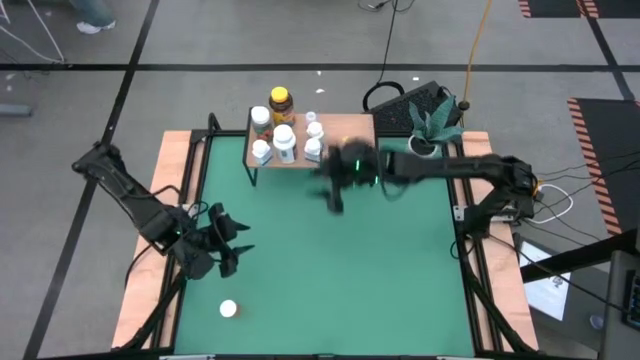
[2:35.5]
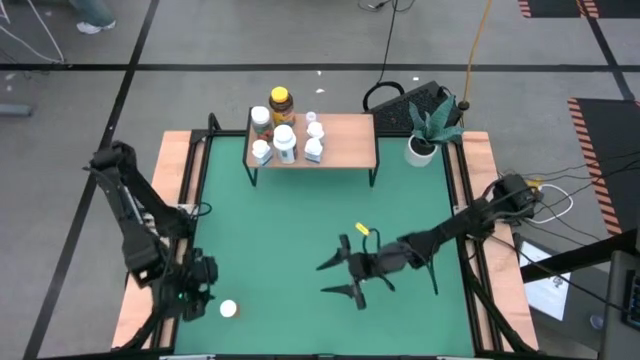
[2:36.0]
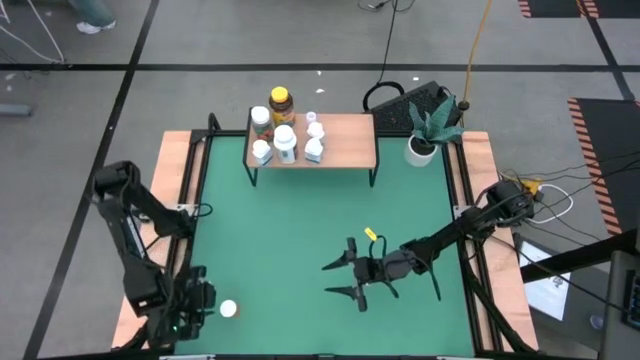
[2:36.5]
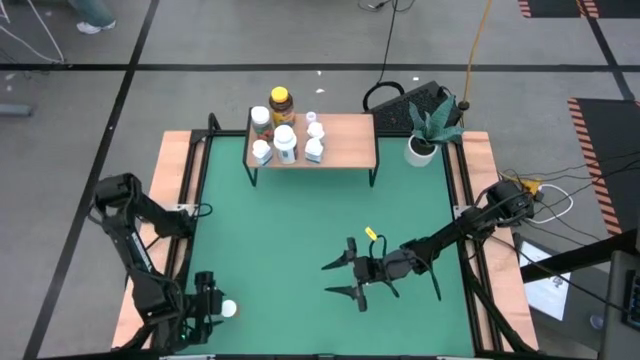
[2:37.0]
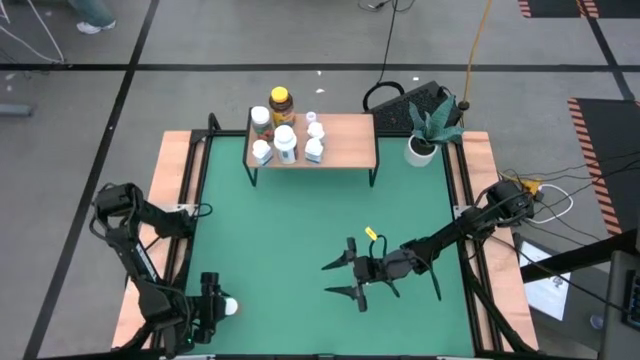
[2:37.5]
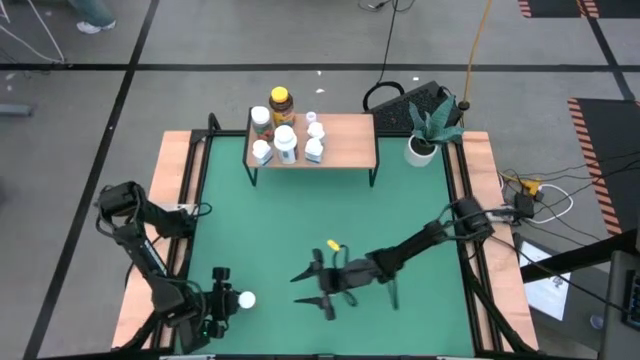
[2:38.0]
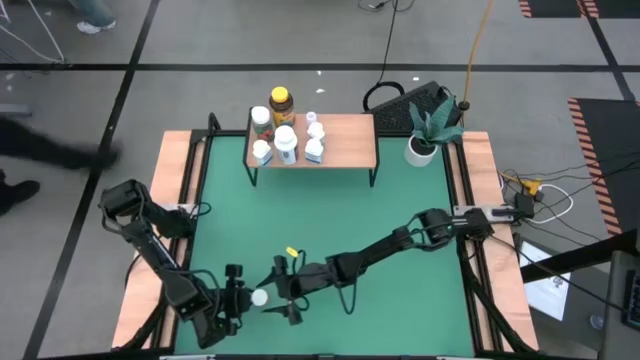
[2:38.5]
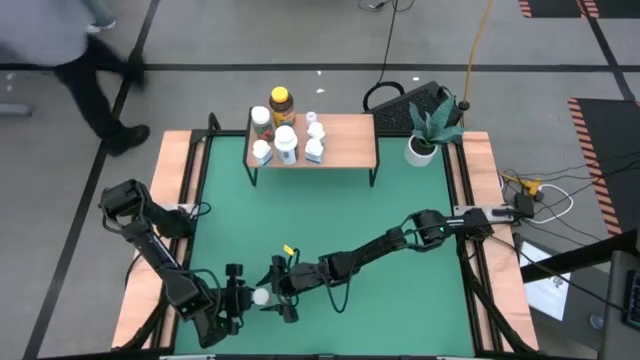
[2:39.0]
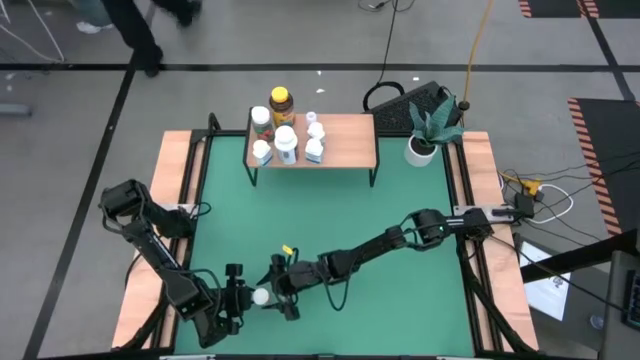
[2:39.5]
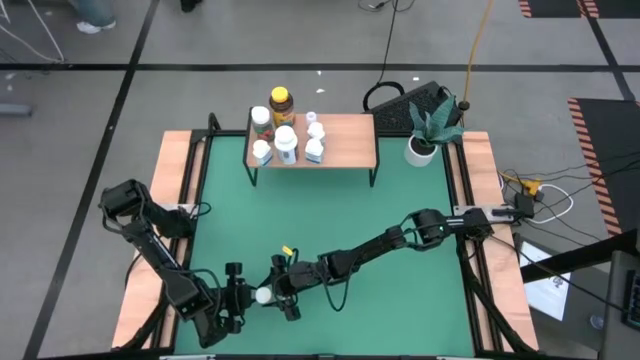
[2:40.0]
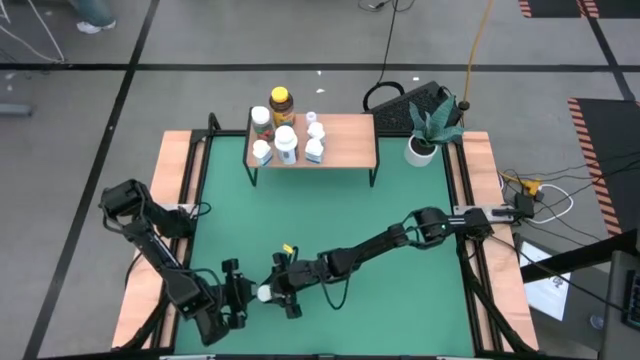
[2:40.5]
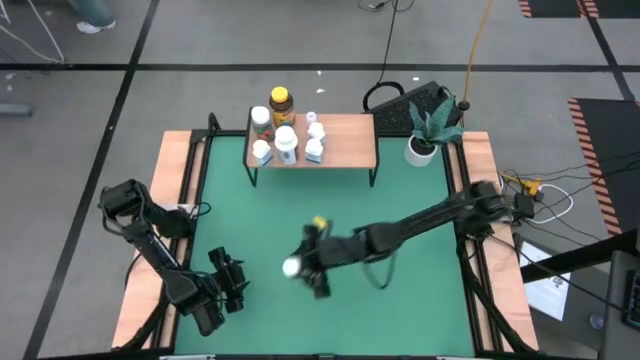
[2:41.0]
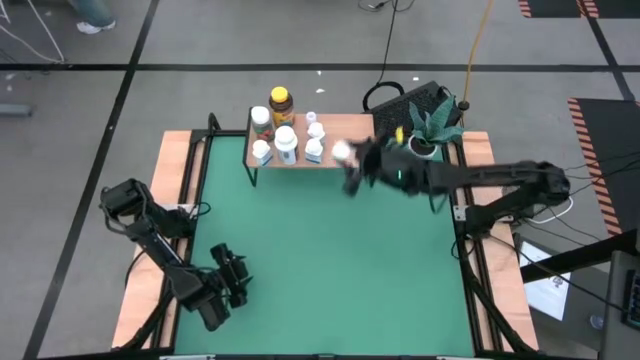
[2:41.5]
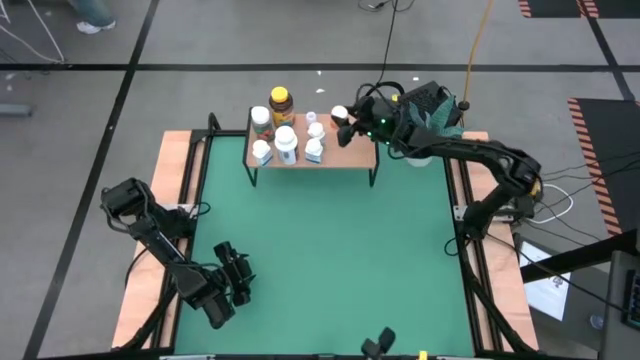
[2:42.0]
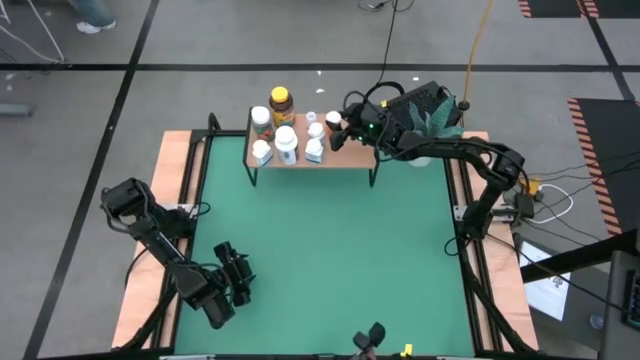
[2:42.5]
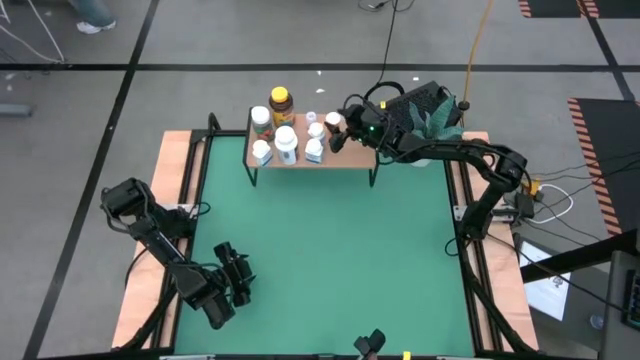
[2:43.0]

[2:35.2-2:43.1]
Task: Pick and place medicine bottles onto shelf by color
Put the orange medicine bottle on the shelf

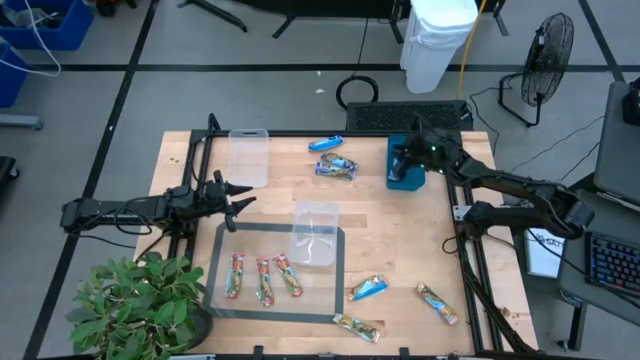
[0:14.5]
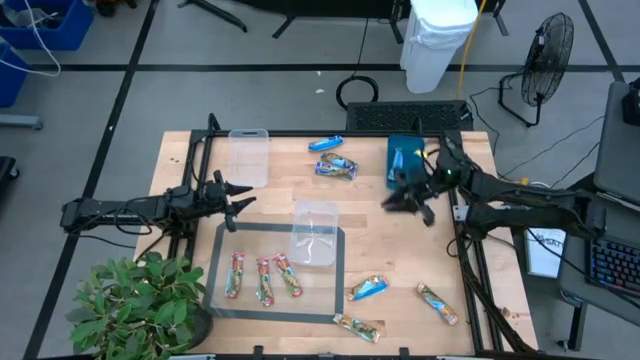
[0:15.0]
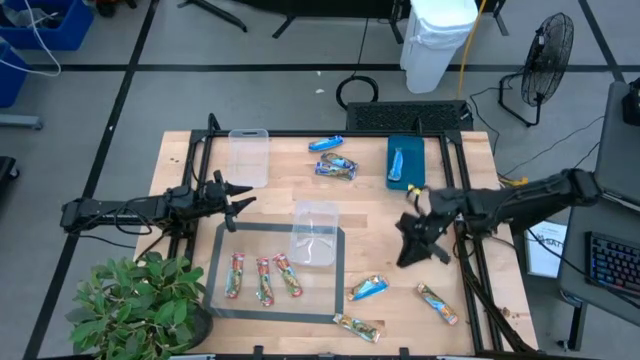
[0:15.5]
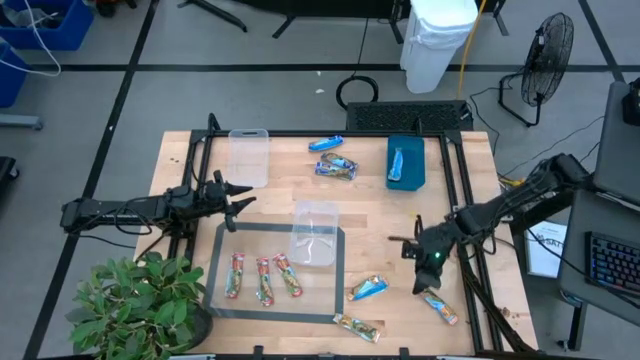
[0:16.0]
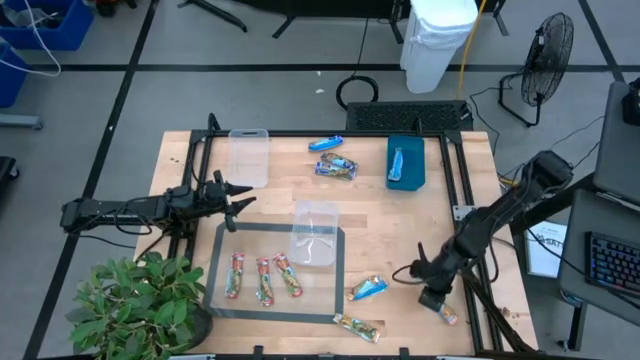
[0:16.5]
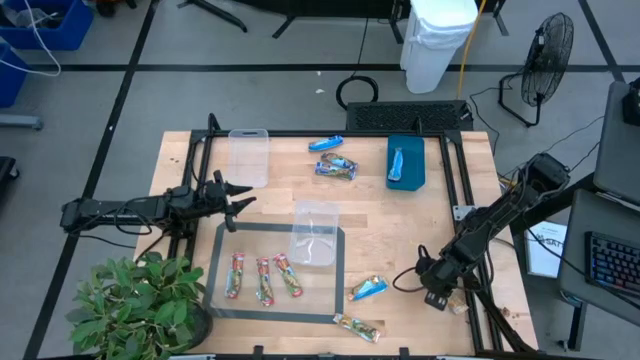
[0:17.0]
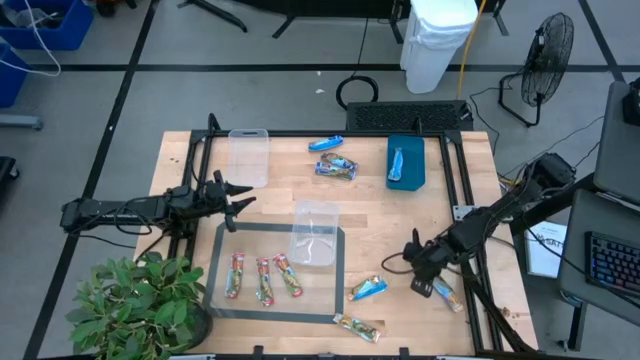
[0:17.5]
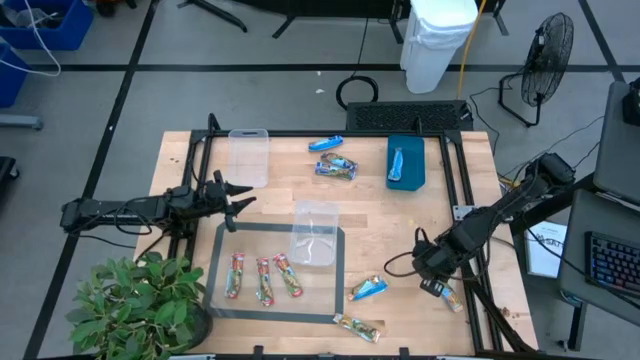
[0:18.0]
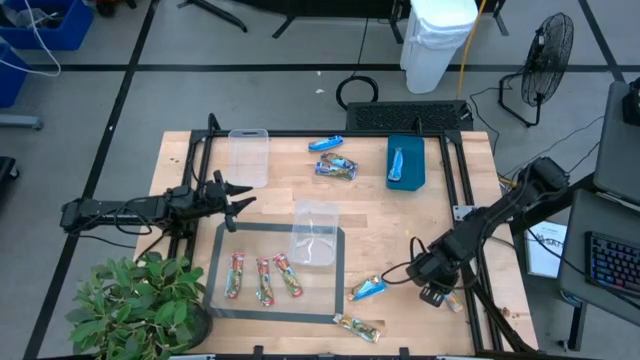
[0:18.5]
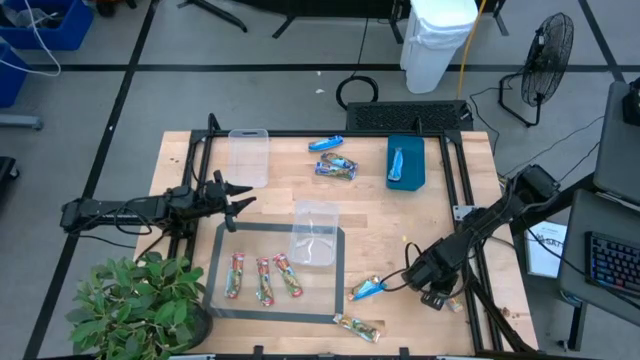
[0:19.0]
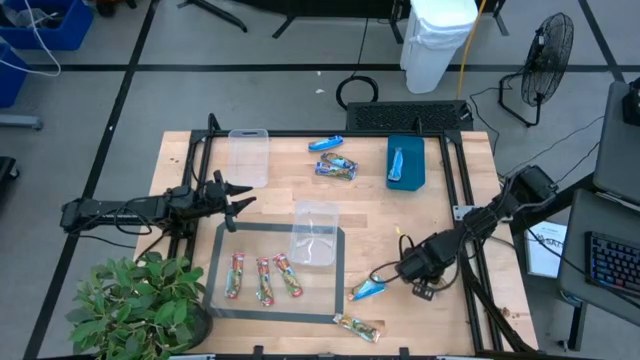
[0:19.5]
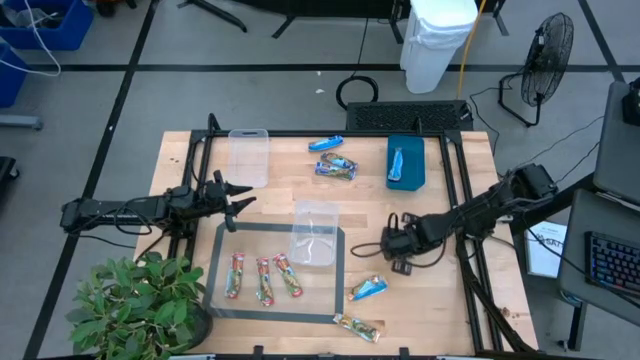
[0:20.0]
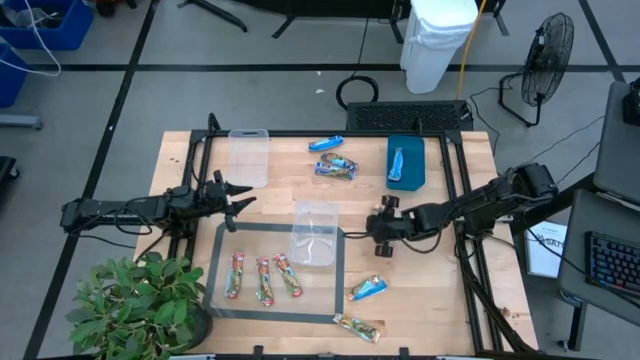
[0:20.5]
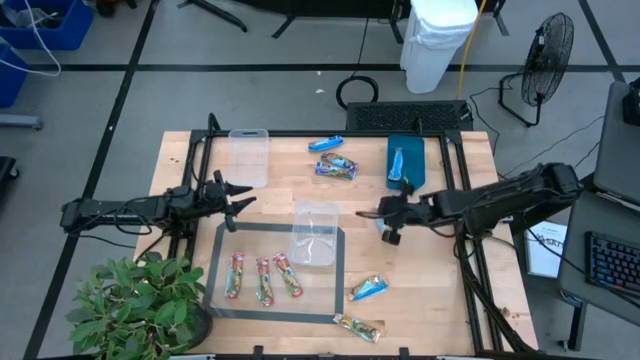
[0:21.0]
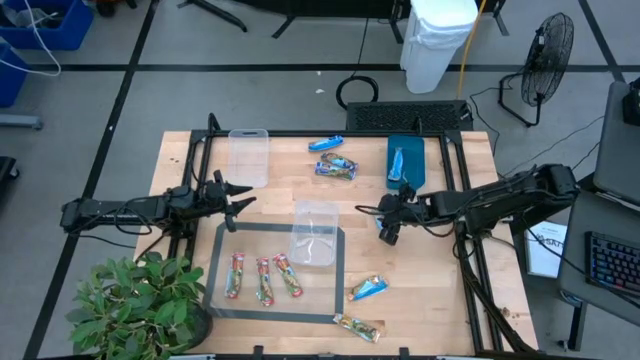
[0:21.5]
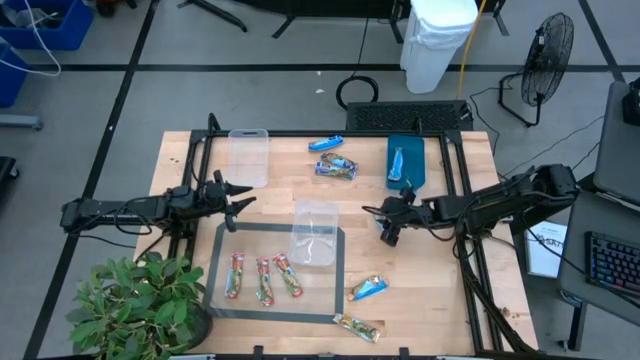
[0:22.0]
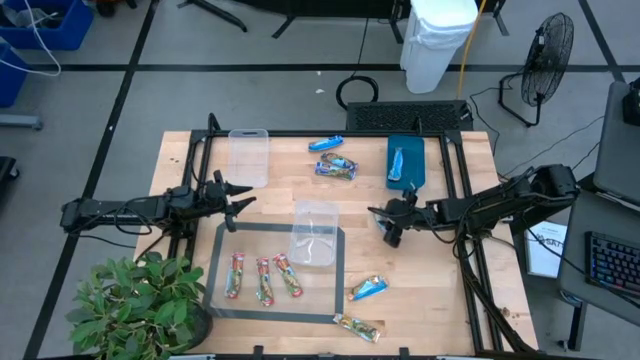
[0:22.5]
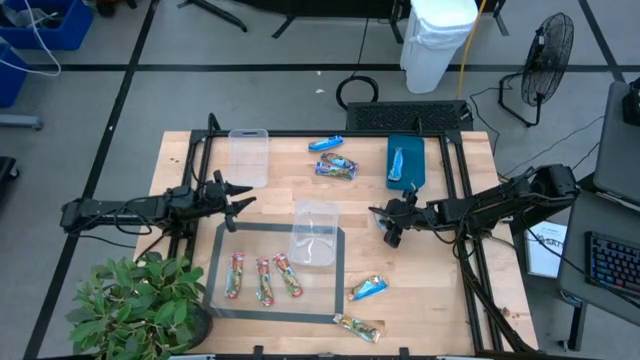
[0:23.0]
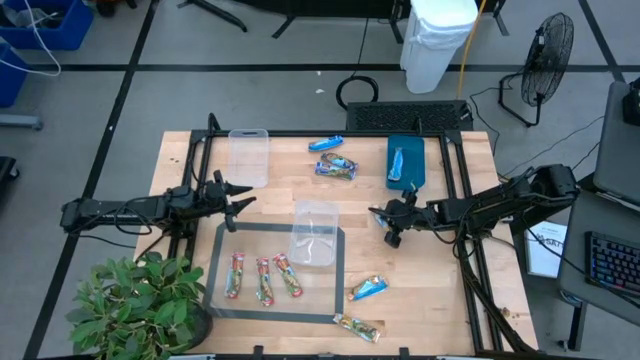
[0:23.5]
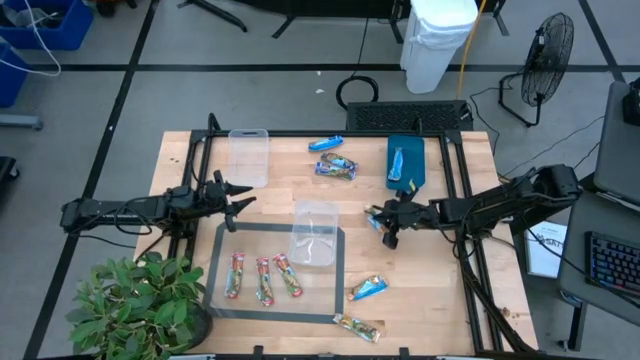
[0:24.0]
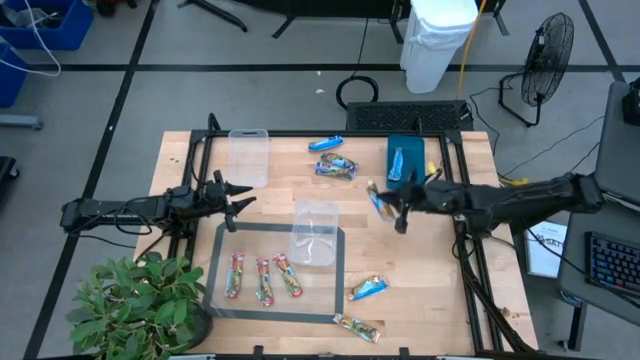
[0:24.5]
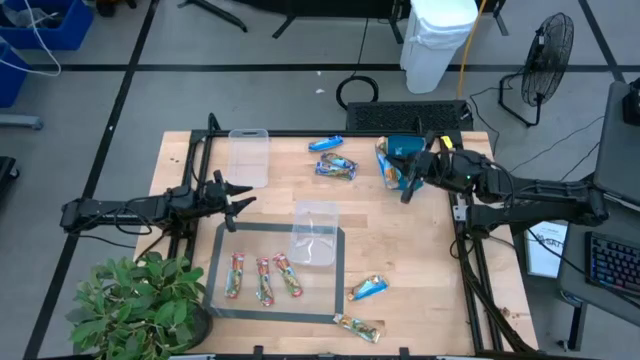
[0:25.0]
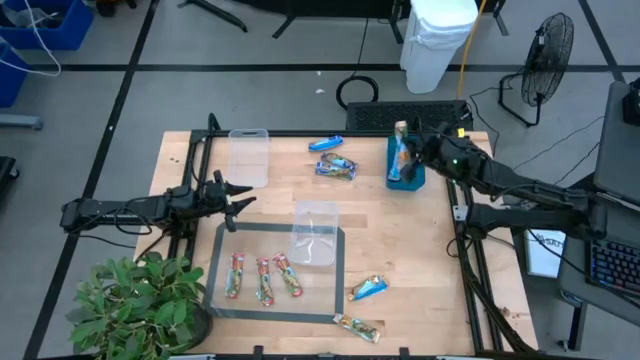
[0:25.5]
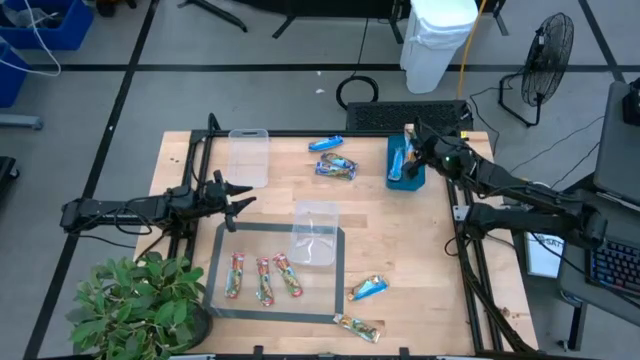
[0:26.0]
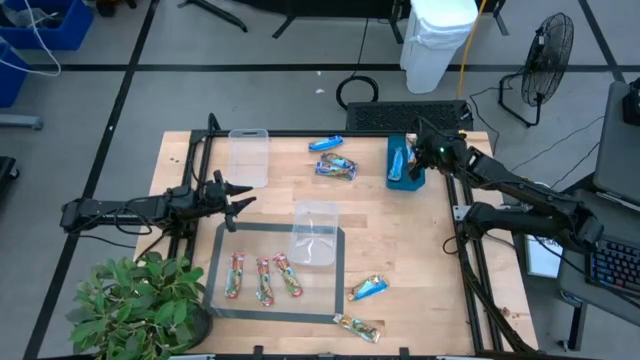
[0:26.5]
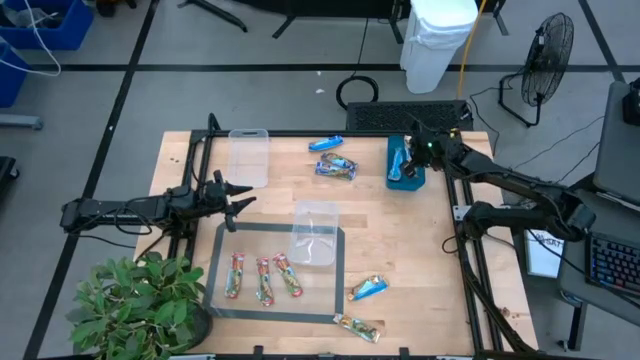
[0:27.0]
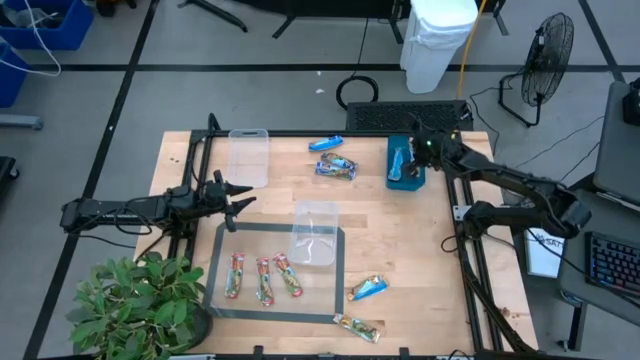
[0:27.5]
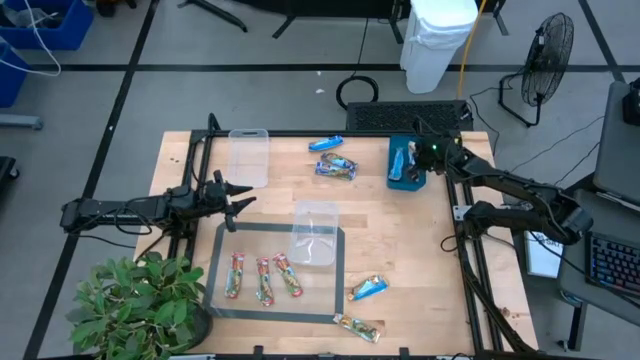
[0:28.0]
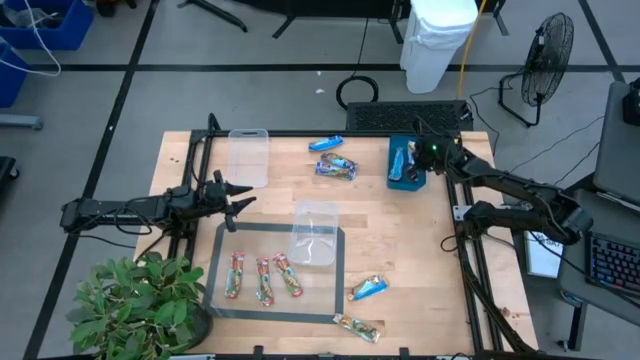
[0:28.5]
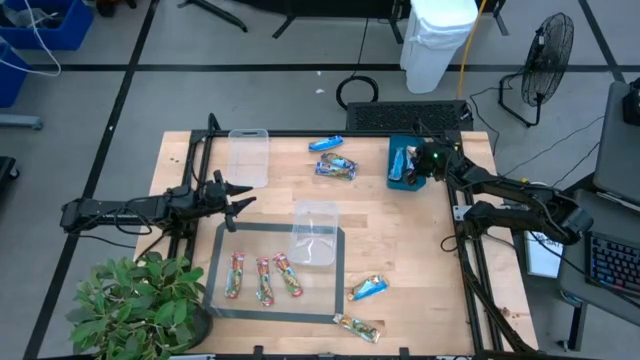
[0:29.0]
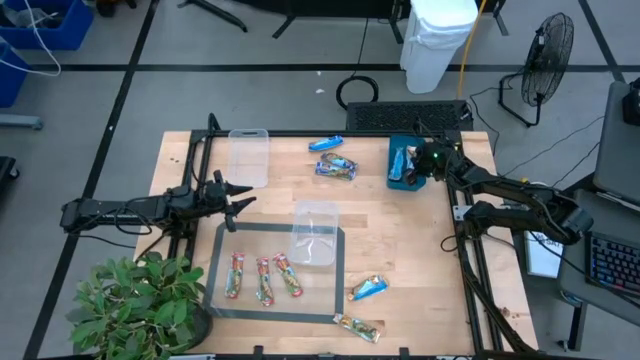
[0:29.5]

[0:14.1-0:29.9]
Task: Pick and place Granola Bars by type
Put the yellow granola bar into the blue bin
